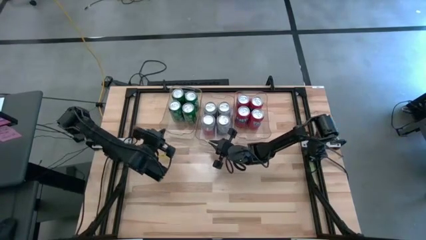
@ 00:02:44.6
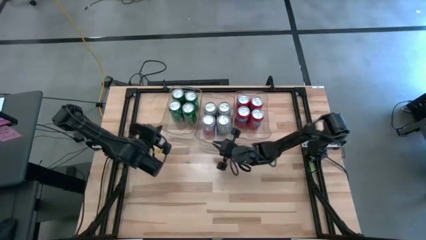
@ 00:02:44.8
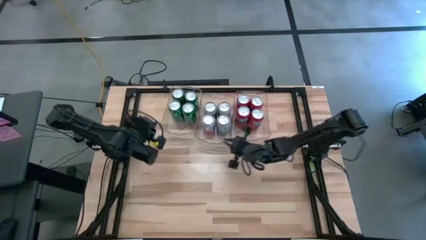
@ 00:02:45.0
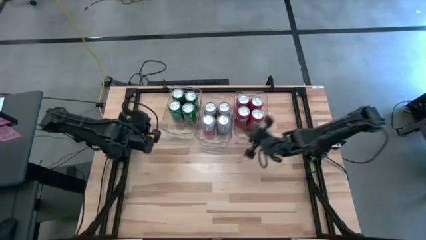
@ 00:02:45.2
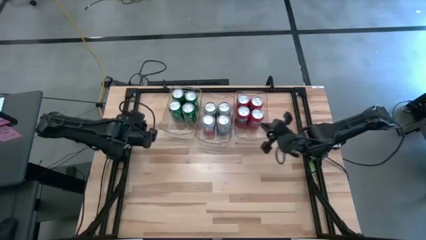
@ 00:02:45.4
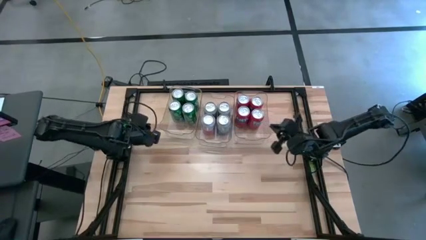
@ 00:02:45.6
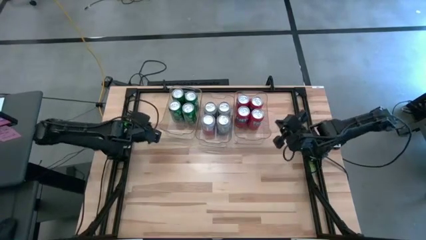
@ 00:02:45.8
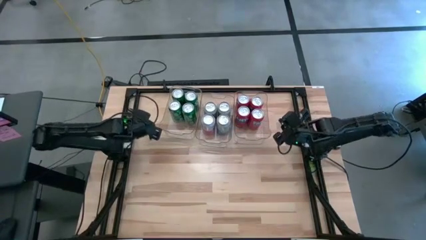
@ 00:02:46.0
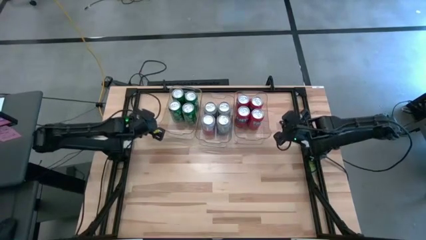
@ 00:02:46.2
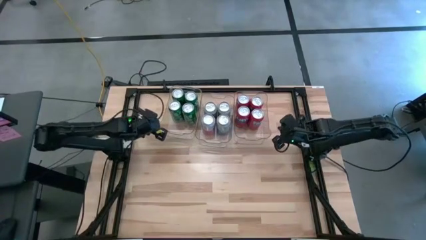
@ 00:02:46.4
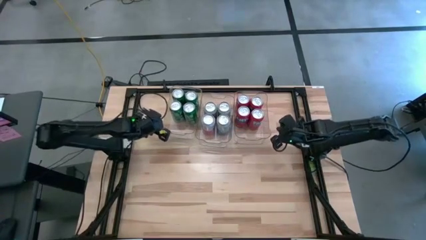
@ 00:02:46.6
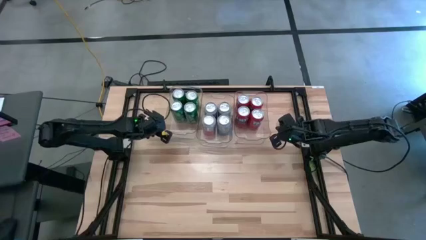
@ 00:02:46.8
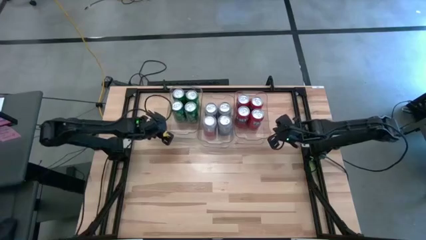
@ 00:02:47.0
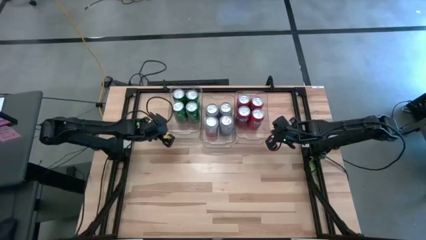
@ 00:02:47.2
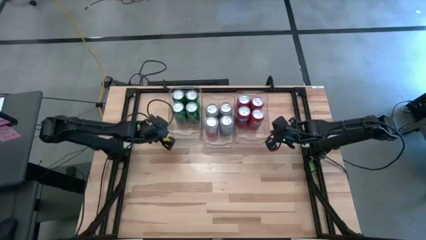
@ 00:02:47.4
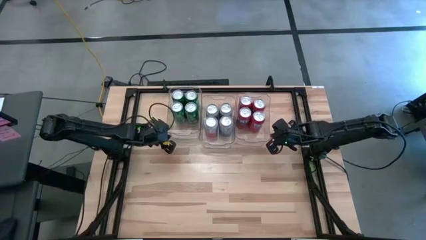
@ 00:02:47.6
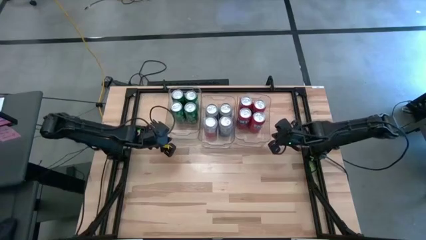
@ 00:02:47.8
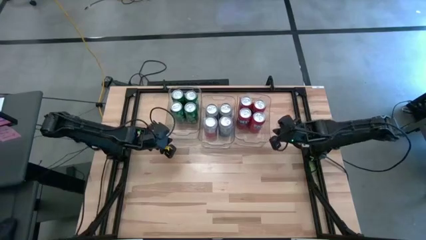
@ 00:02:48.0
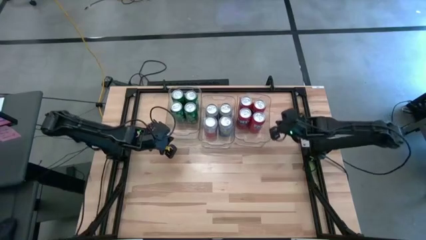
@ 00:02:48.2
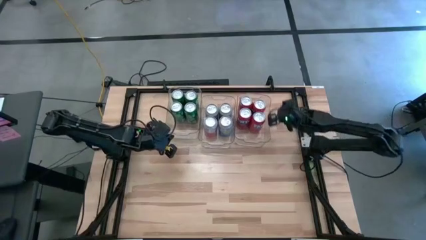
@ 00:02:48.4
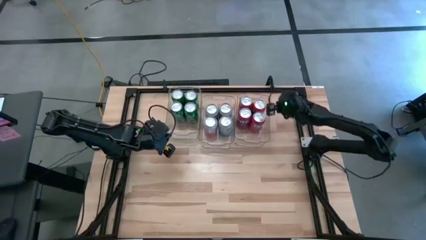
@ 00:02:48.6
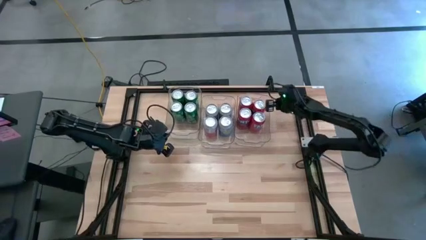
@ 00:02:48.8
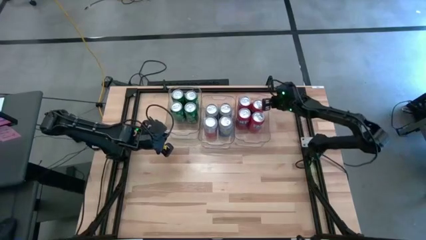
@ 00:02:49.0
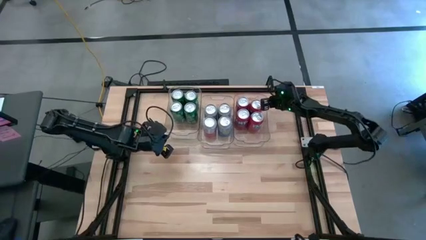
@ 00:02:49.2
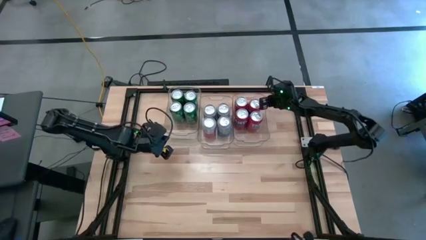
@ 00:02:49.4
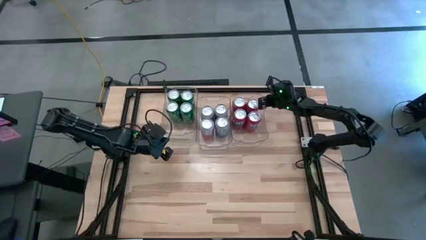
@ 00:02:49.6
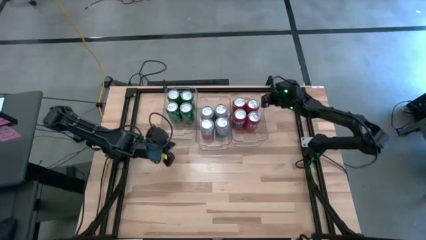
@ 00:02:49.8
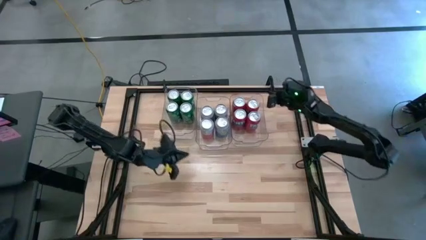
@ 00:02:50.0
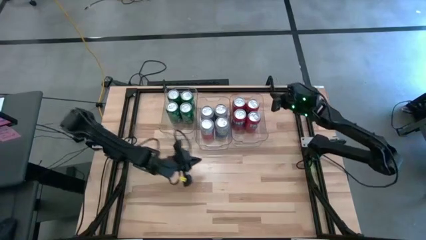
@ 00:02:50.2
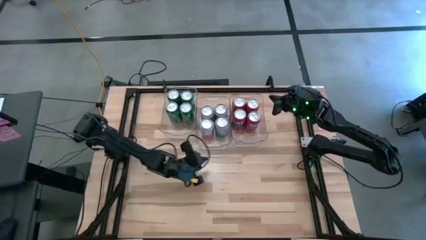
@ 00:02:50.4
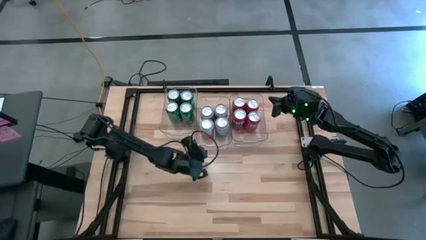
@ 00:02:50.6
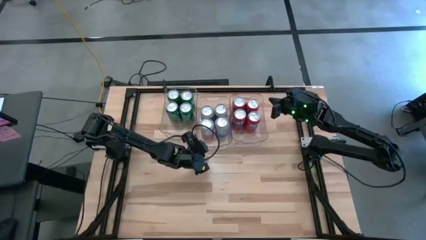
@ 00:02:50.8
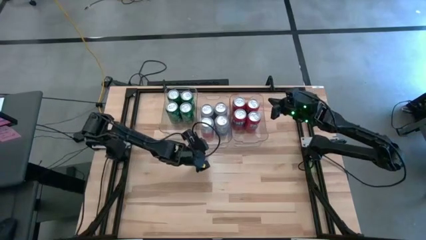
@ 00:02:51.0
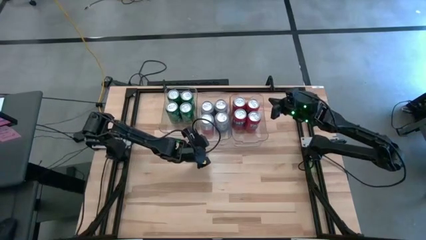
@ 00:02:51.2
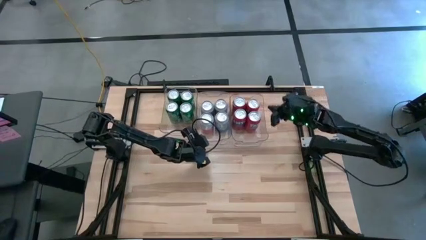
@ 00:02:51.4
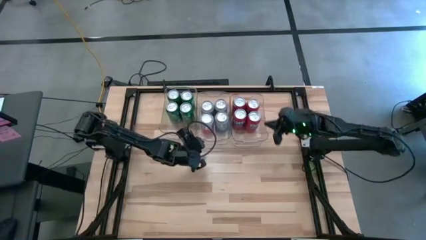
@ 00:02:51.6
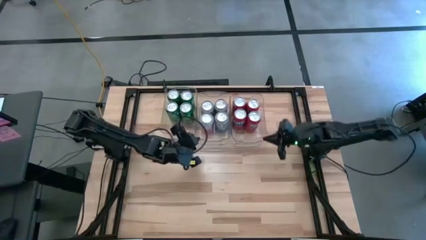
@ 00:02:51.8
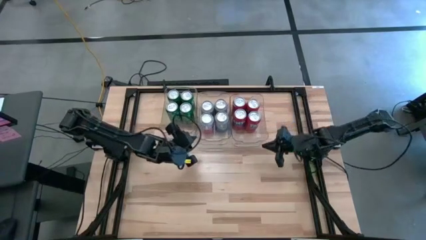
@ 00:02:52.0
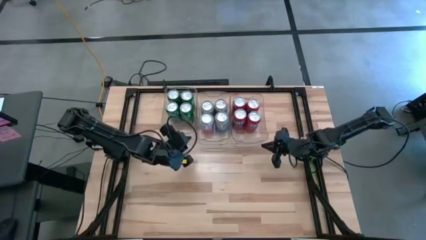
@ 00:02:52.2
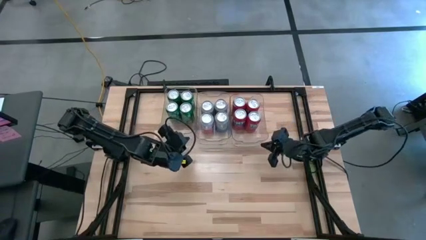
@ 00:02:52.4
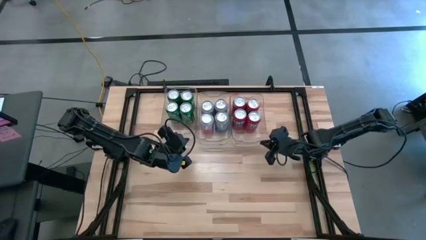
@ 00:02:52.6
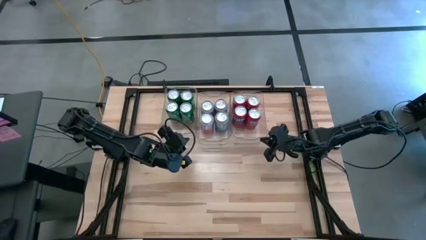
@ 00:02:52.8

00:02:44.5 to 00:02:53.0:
Task: Sort soda cans
Adjust the transparent bins

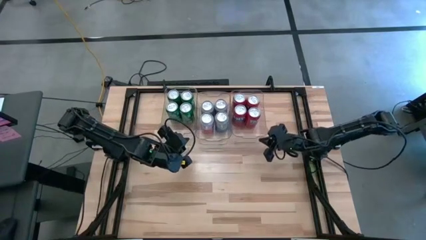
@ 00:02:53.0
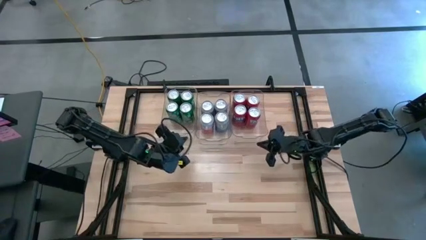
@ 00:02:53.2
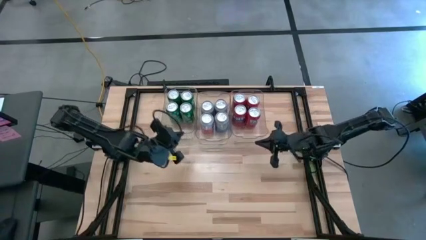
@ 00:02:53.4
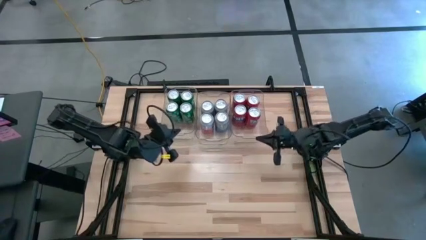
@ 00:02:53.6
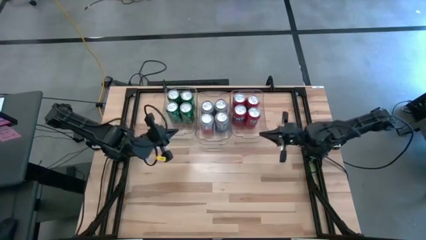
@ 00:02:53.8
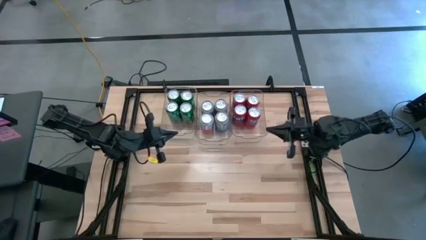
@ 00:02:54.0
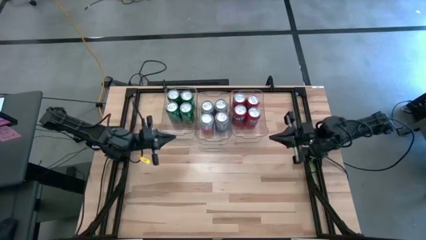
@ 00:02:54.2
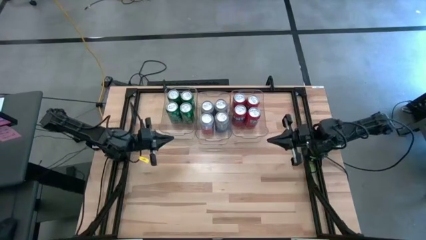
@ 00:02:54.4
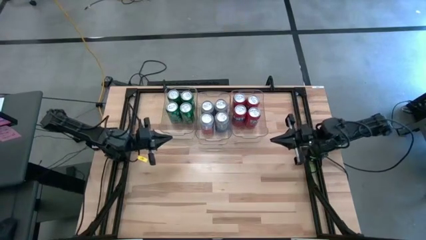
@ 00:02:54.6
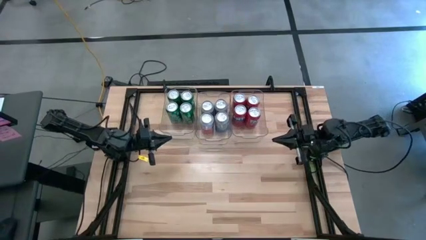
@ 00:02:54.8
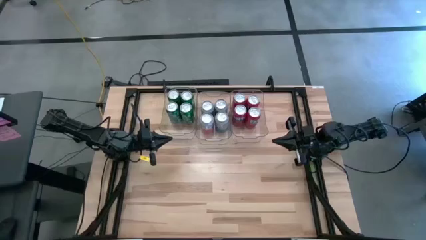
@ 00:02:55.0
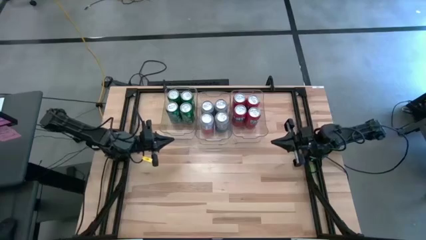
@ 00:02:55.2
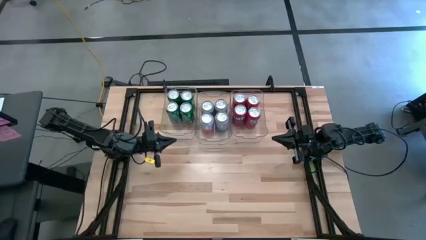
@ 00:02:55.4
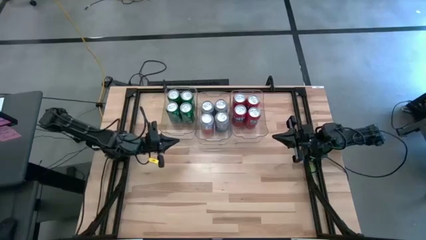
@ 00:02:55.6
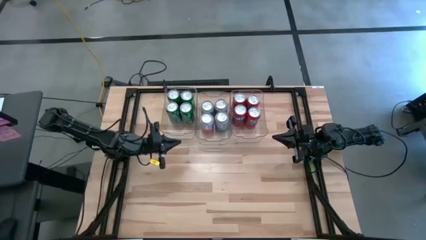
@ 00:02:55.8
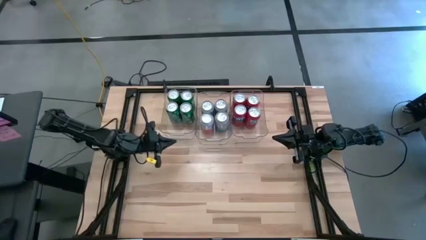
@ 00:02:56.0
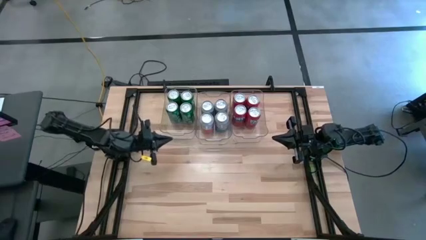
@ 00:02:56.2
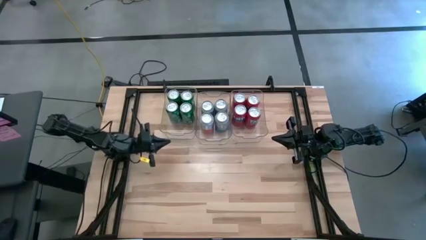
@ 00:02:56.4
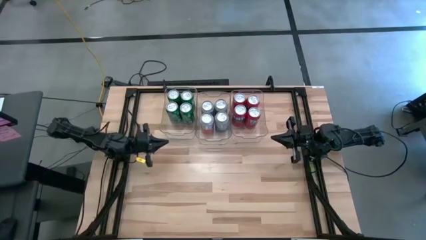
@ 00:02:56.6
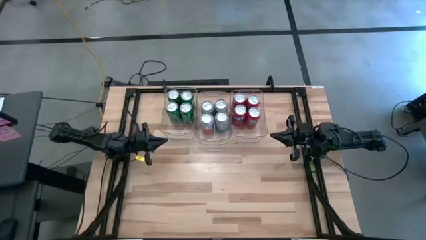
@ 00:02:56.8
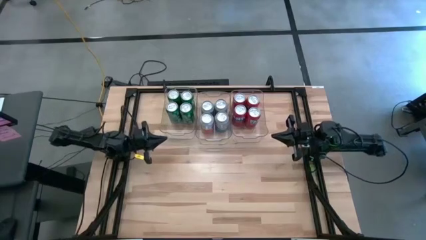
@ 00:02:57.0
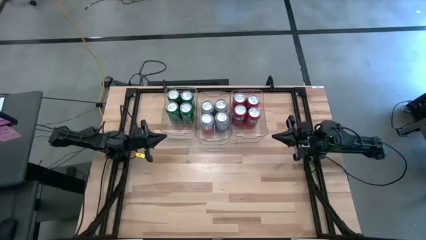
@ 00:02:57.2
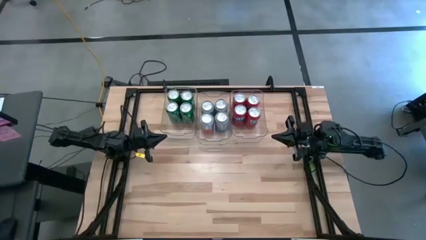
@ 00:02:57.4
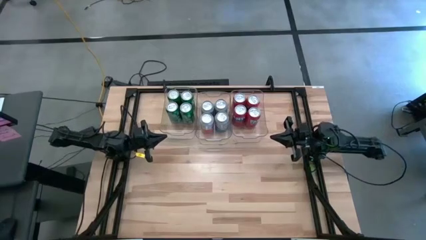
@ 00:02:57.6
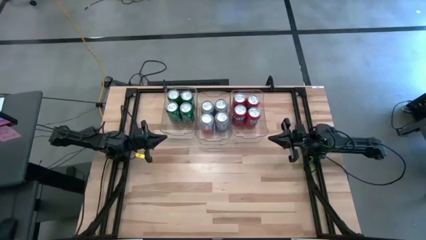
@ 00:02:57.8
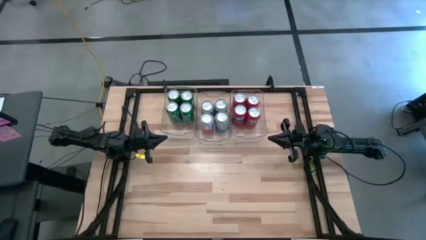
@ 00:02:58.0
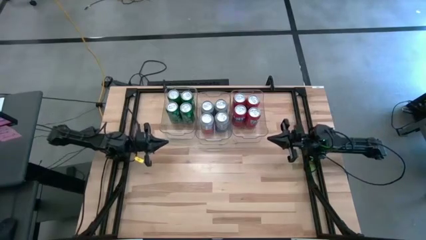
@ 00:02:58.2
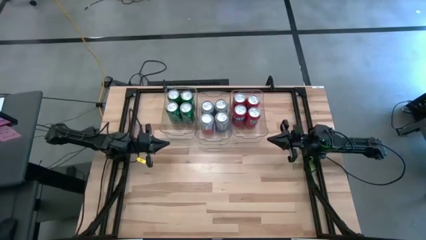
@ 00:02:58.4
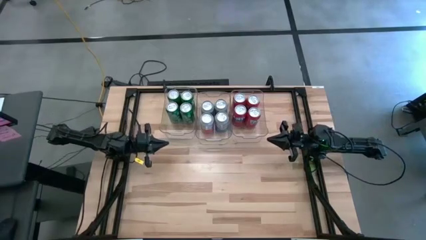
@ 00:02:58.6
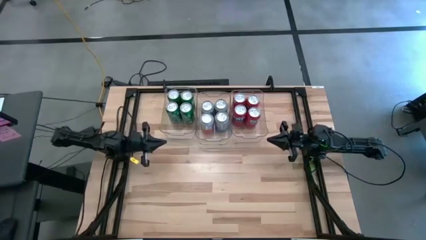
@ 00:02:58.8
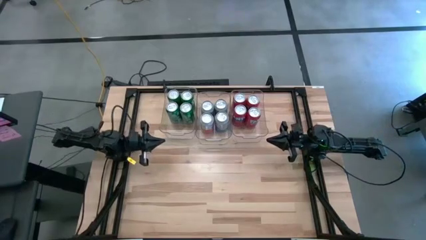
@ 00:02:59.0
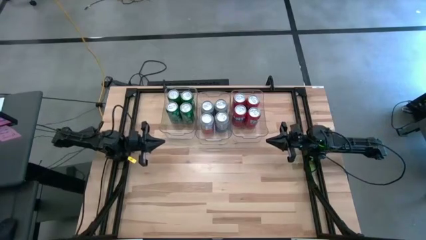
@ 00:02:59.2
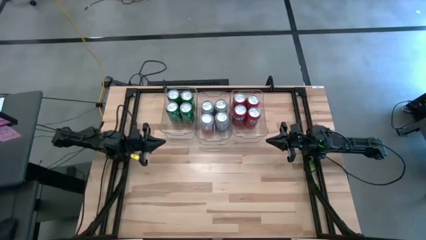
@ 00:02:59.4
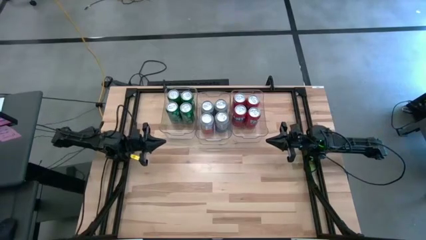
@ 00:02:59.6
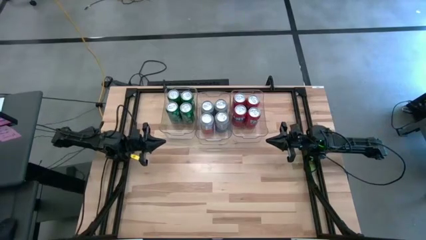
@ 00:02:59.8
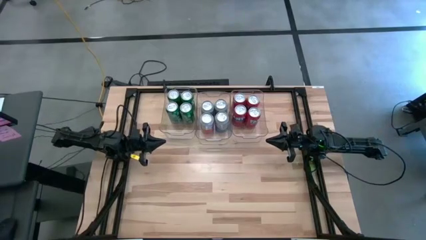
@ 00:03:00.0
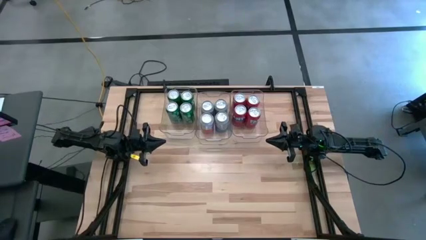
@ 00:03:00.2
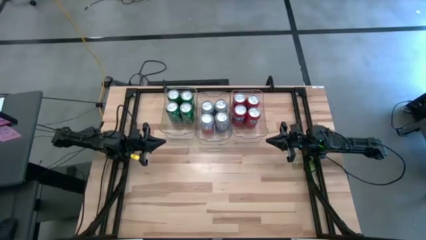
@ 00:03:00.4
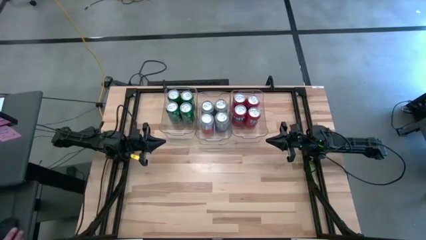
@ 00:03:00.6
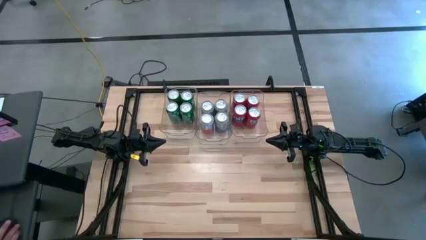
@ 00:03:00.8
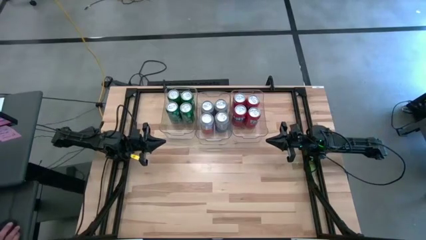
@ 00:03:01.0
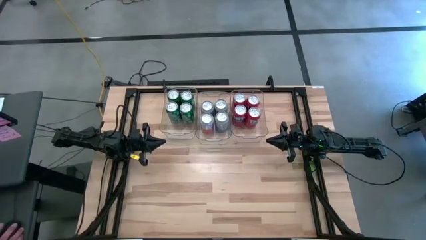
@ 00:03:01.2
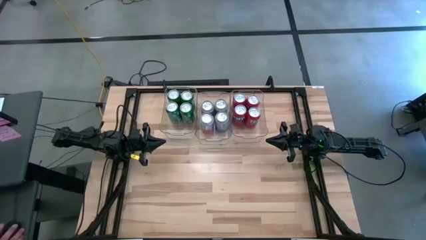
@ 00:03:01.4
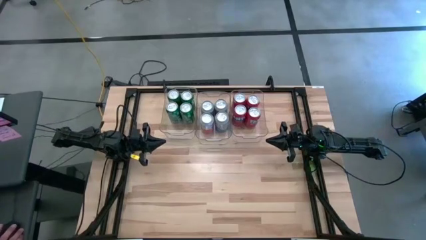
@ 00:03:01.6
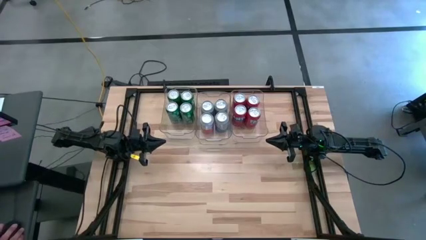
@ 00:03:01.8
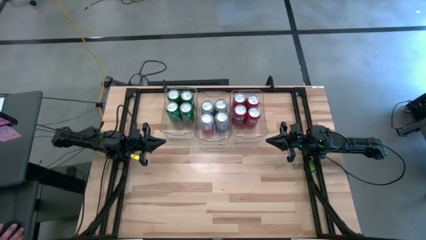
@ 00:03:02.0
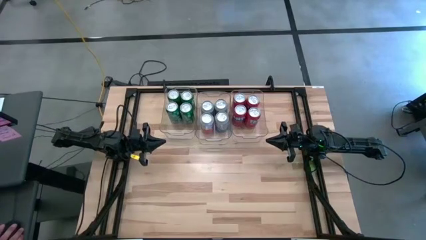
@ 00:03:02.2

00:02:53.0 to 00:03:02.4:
Return to Home Position
